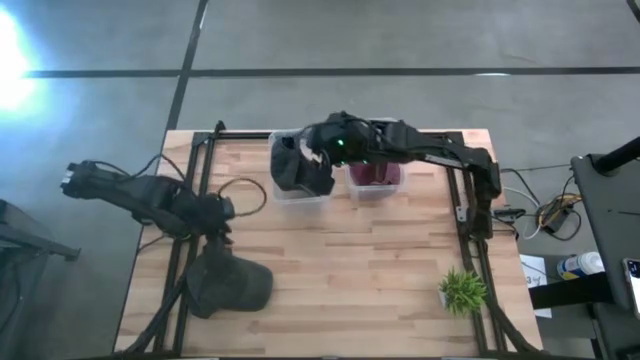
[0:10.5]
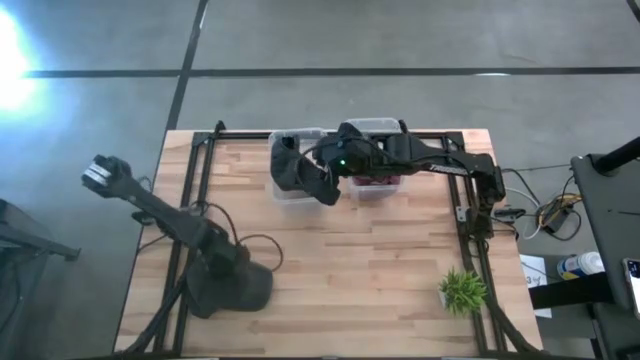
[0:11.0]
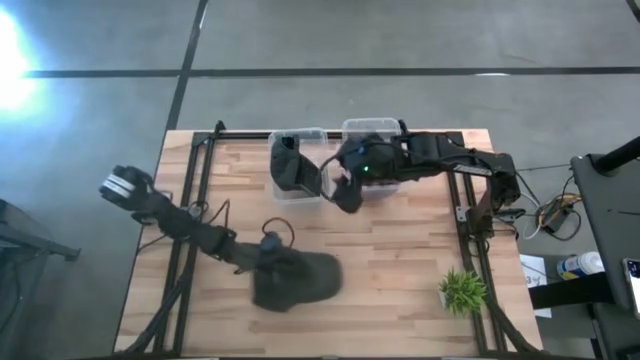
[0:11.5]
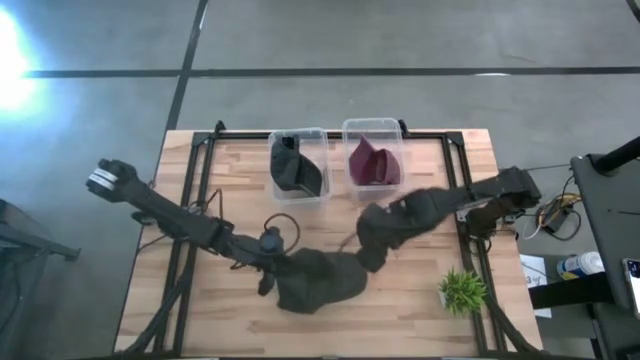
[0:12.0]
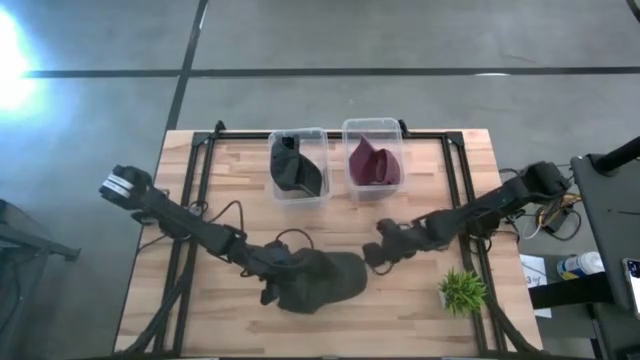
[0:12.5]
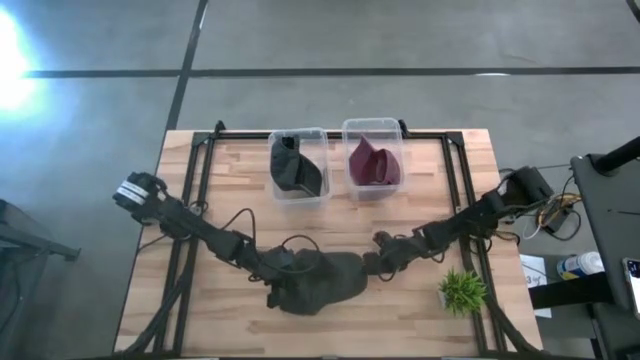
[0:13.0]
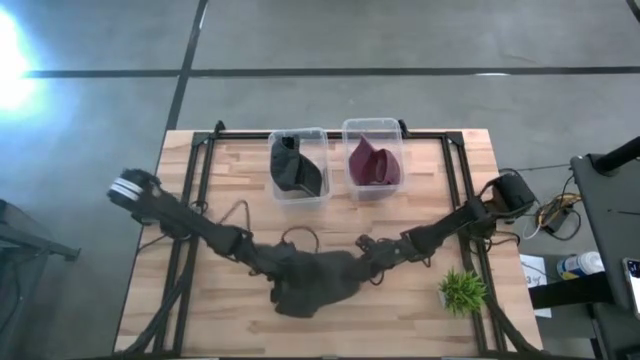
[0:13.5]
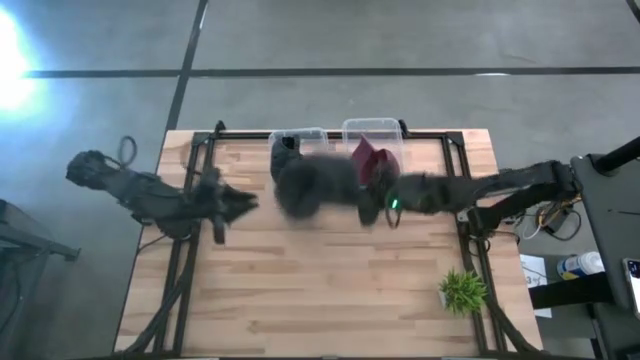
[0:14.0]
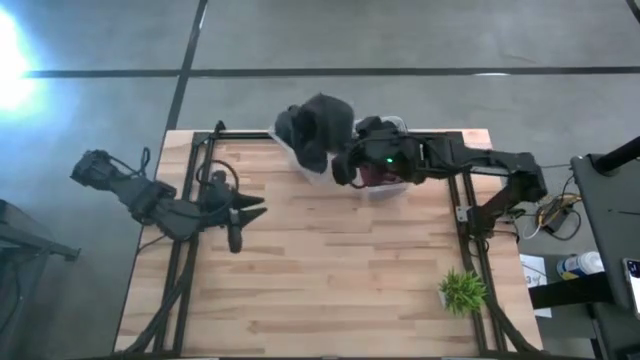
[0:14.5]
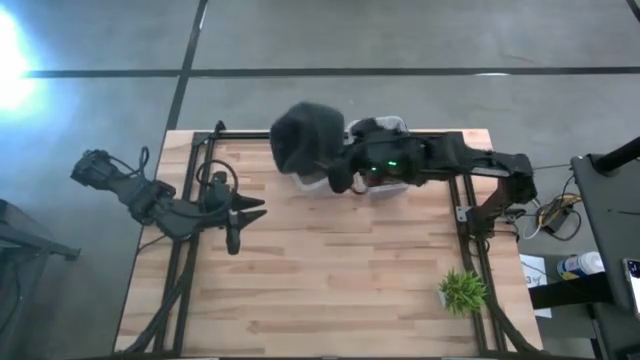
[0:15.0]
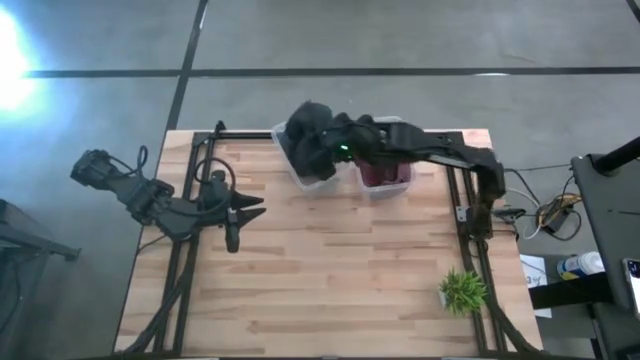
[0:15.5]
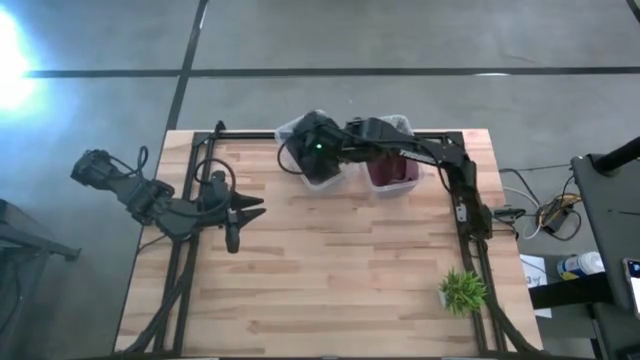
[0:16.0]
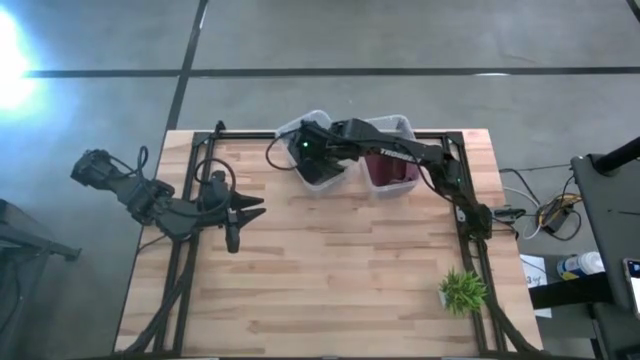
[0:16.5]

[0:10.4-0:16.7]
Task: Pick & Place hat
Put the black cap in the left transparent bin

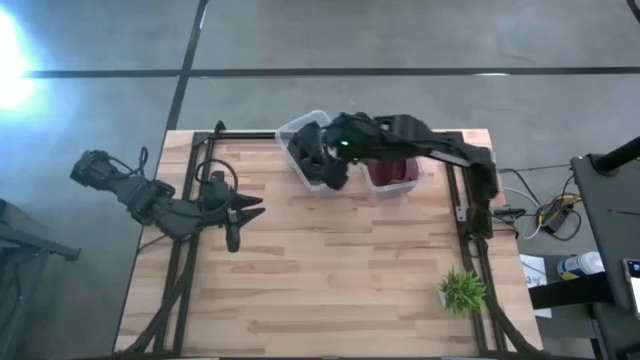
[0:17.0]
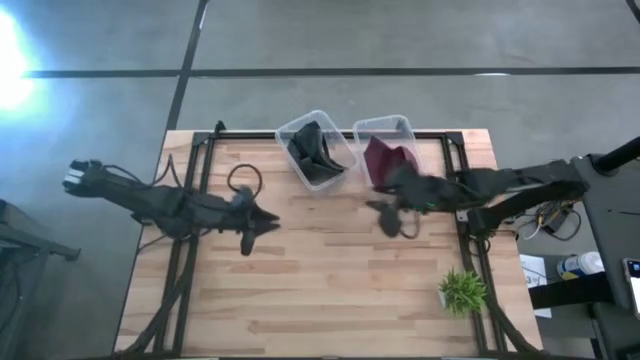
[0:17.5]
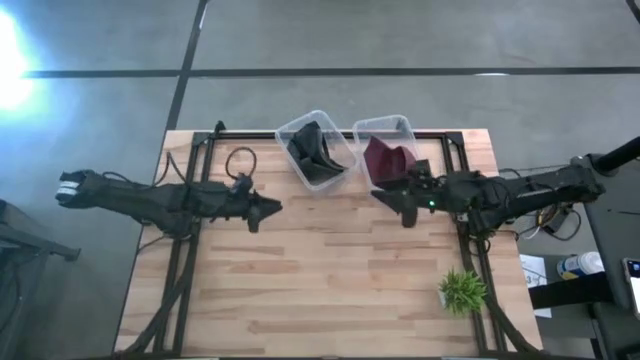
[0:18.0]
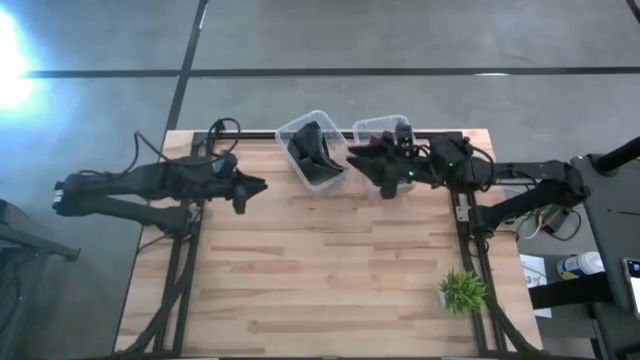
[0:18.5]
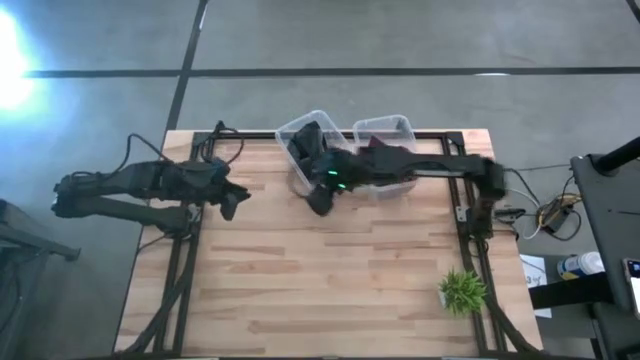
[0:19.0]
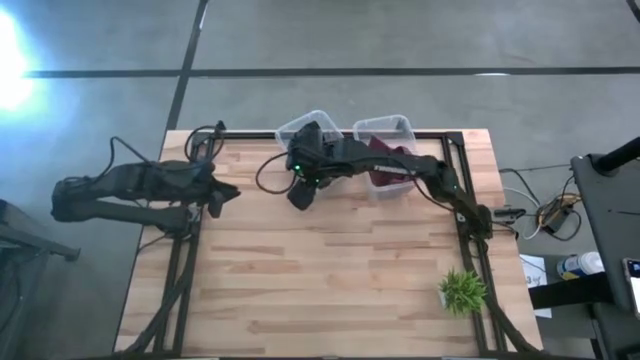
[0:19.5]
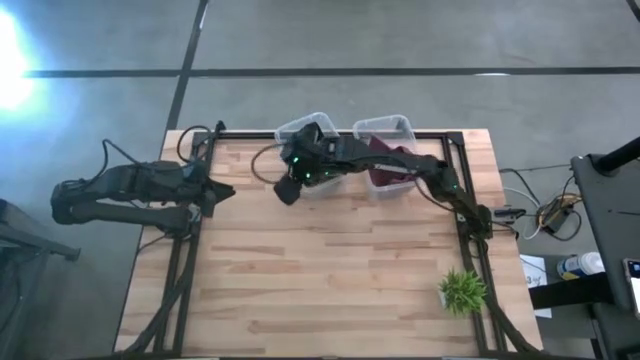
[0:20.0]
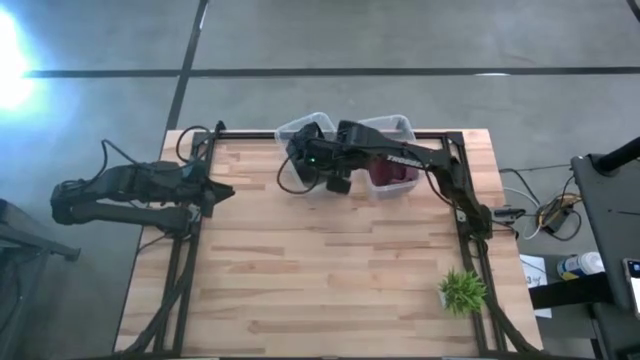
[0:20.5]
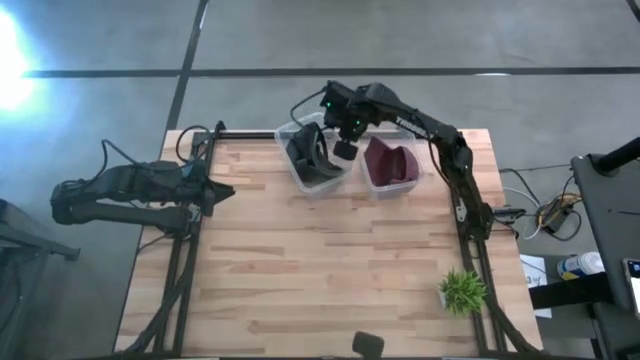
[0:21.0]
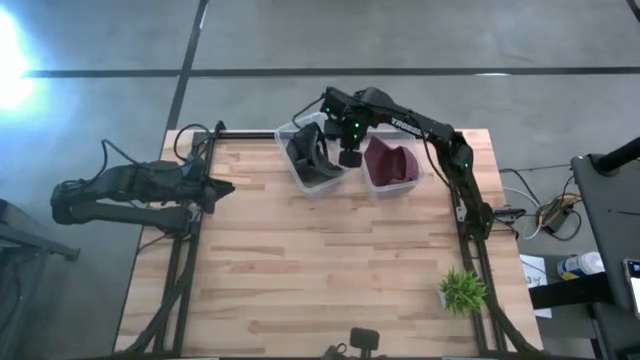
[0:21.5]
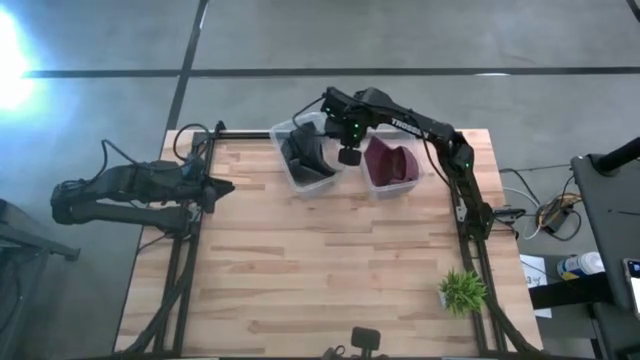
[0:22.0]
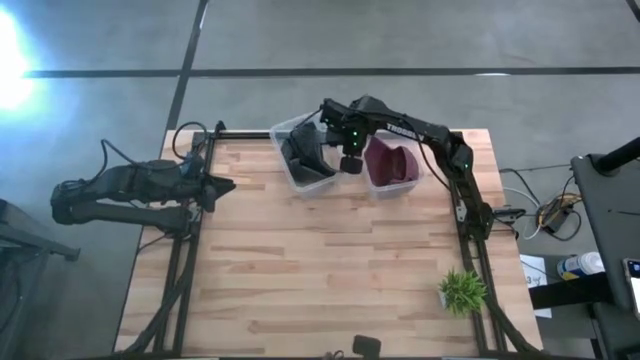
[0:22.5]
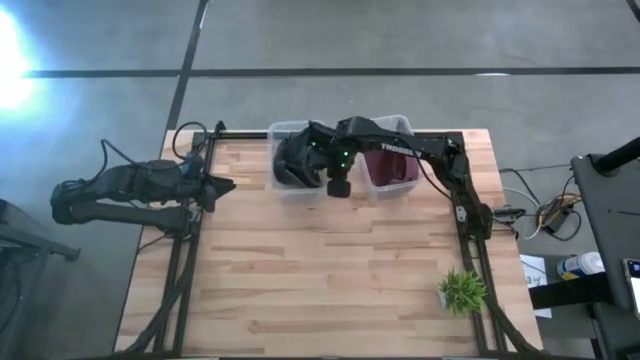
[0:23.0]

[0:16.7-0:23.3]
Adjust the left transparent bin

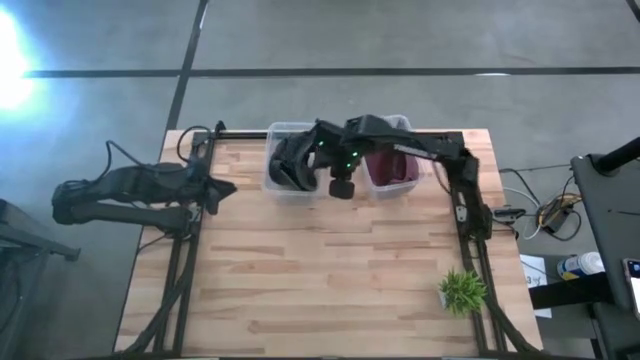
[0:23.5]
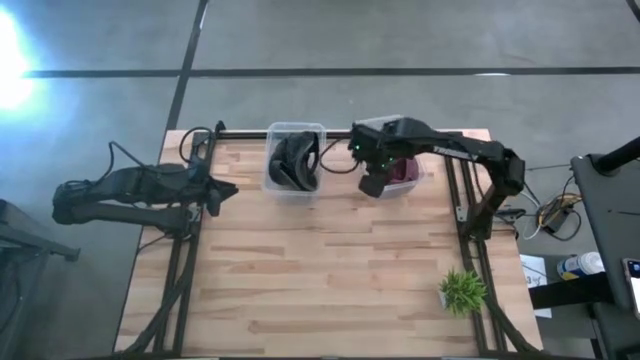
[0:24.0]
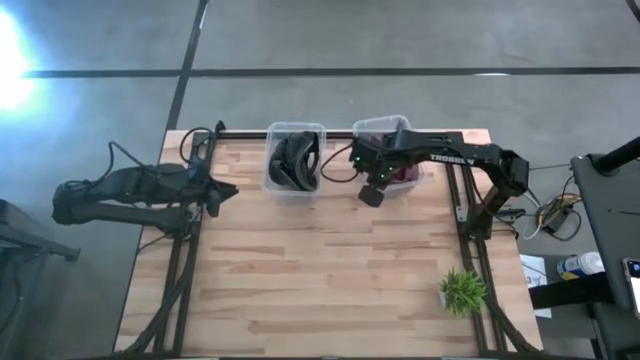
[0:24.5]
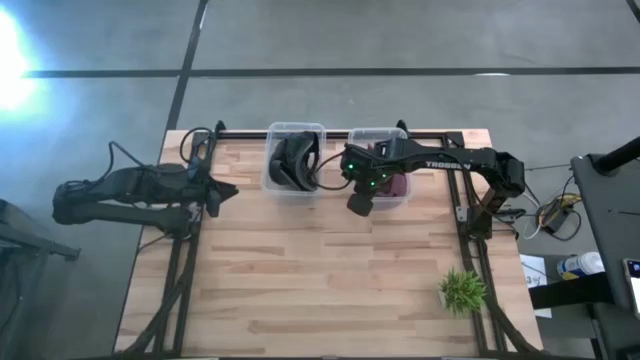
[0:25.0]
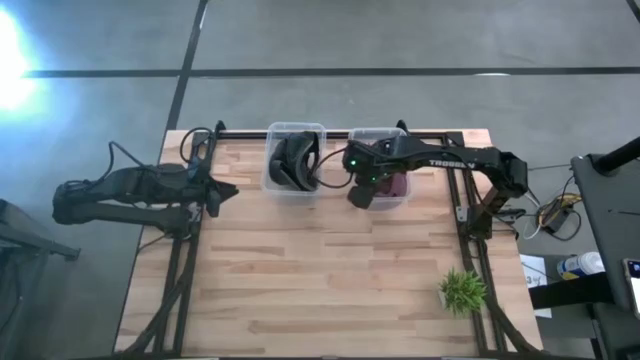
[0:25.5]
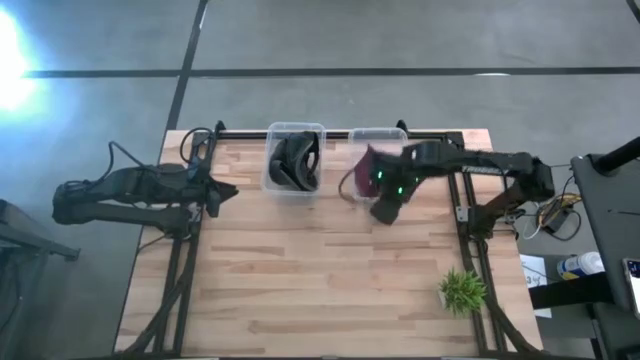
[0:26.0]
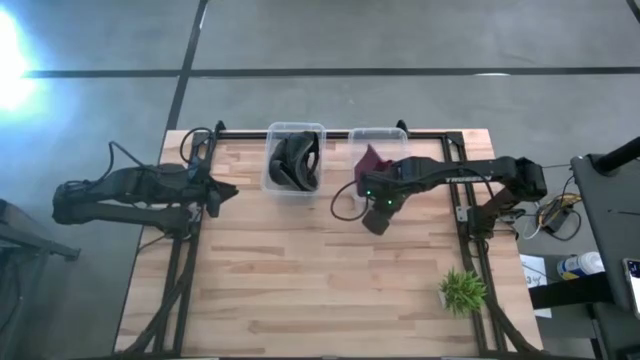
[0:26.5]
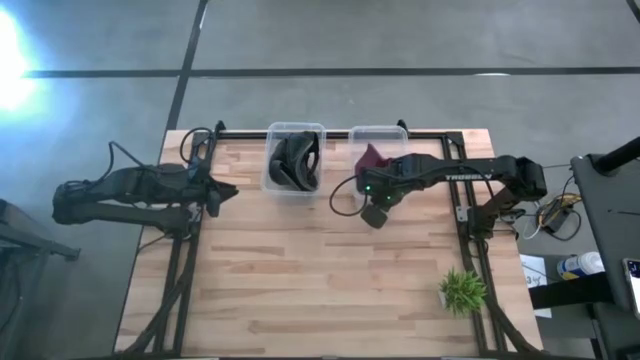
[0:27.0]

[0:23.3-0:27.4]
Adjust the right transparent bin

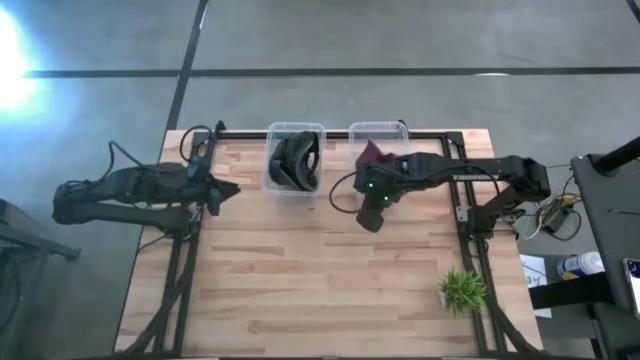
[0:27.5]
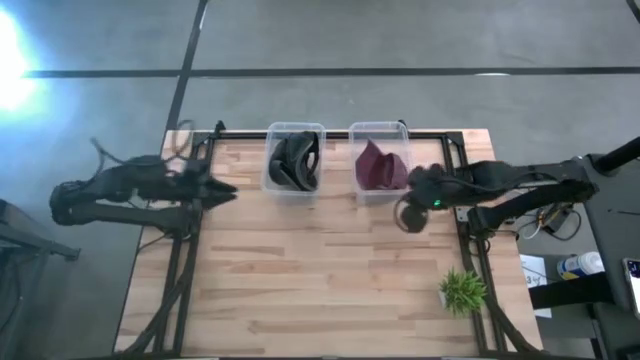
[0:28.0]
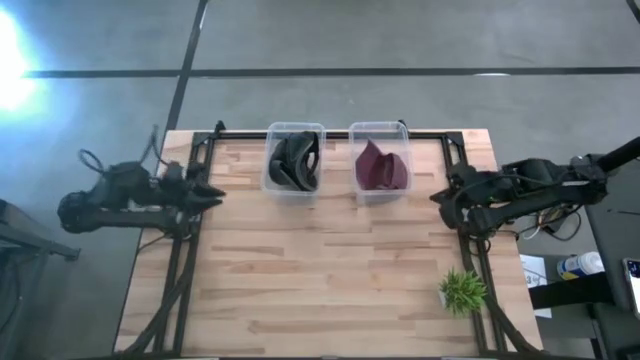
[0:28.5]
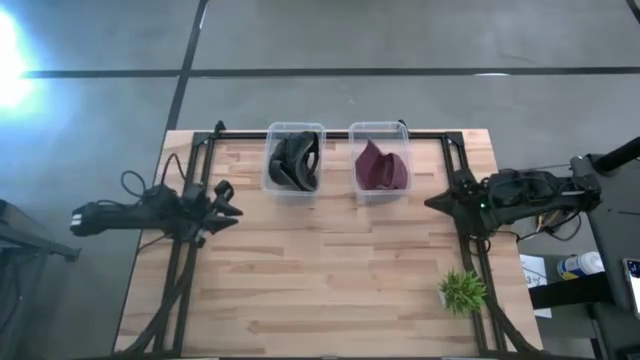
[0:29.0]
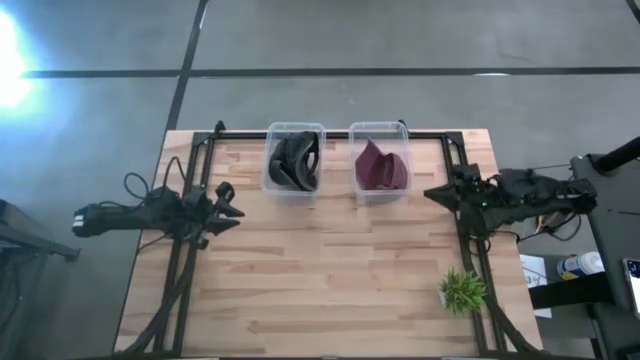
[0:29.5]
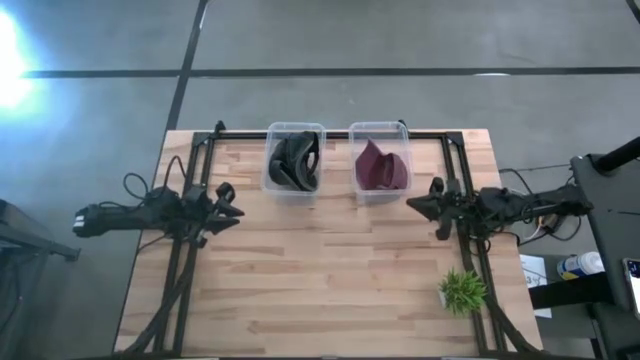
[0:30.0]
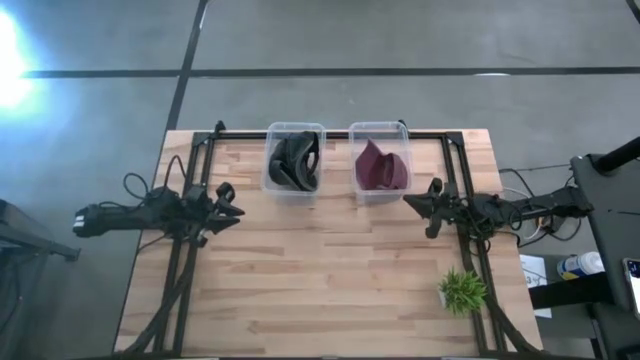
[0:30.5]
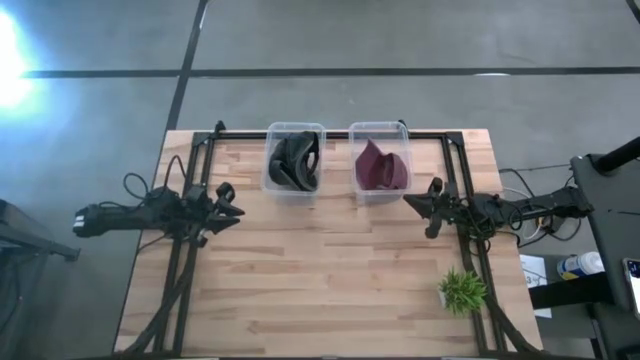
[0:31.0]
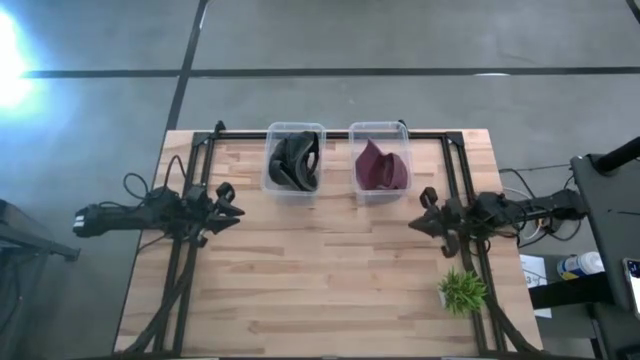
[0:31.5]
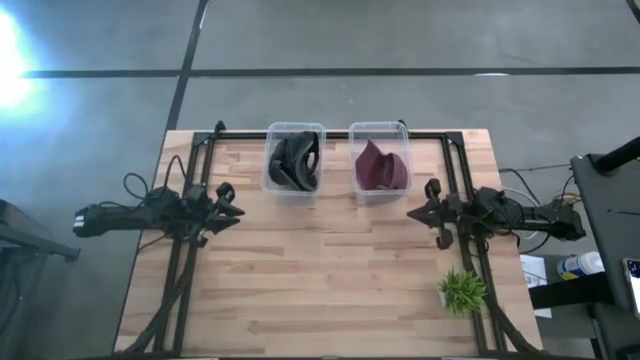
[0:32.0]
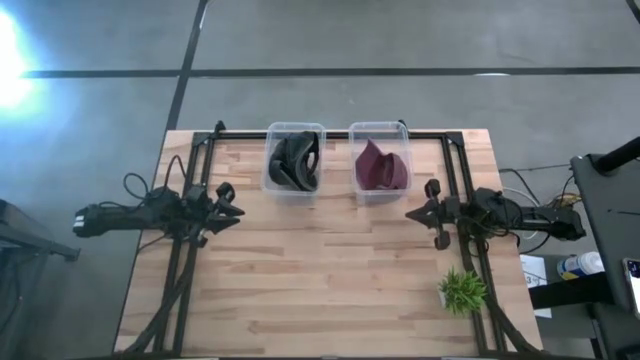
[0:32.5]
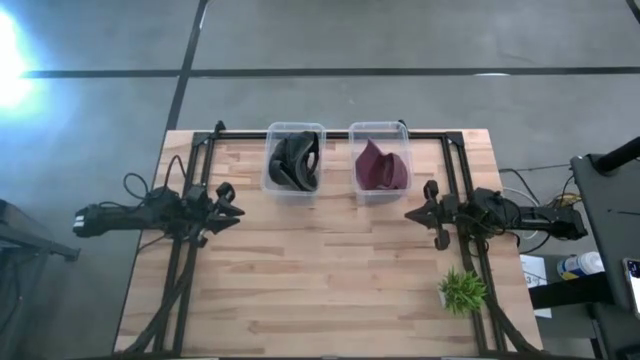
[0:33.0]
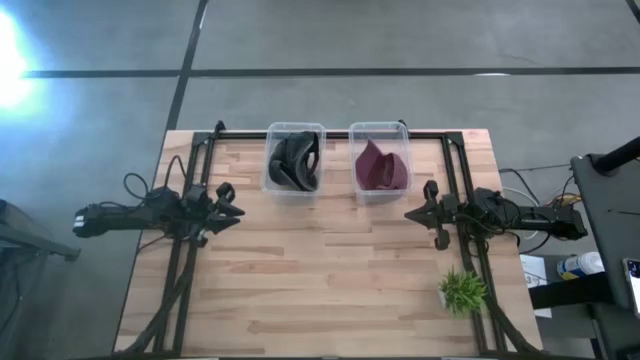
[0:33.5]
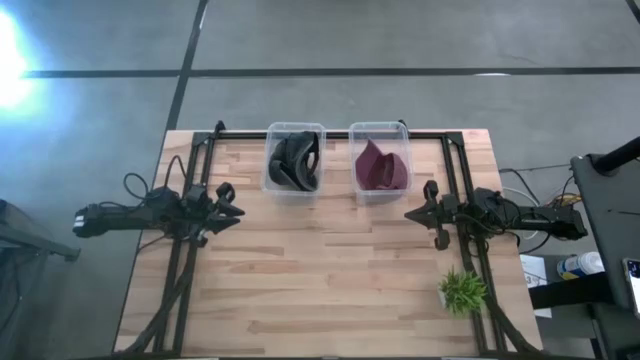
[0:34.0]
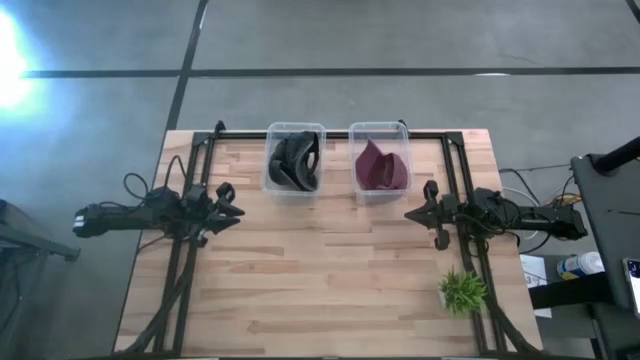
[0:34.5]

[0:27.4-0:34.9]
Return to Home Position
